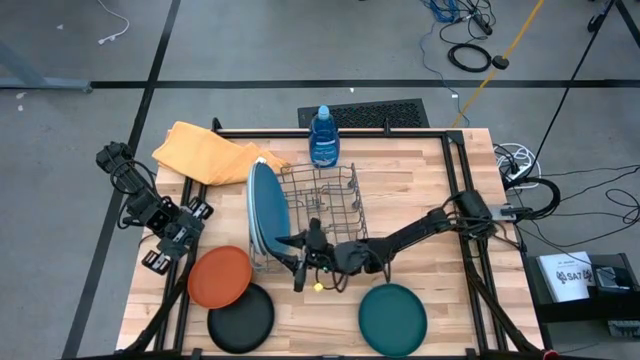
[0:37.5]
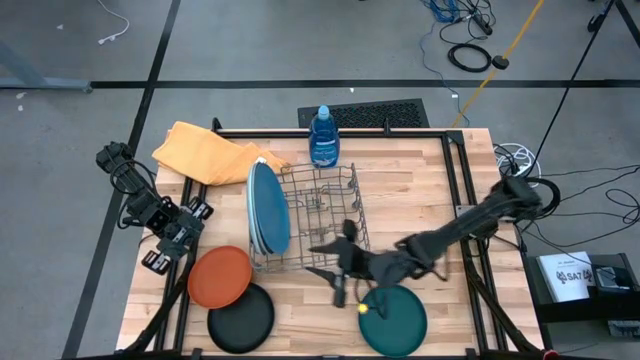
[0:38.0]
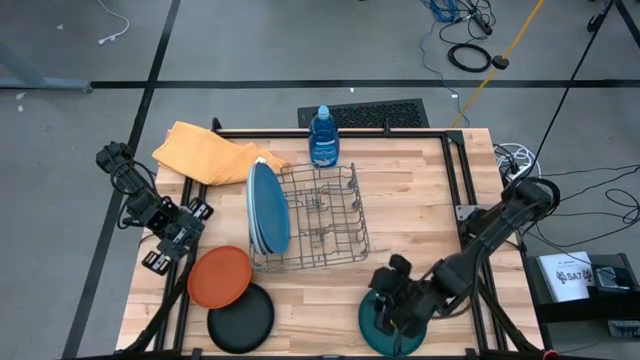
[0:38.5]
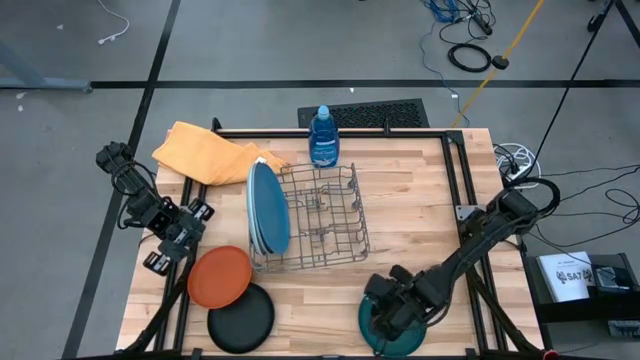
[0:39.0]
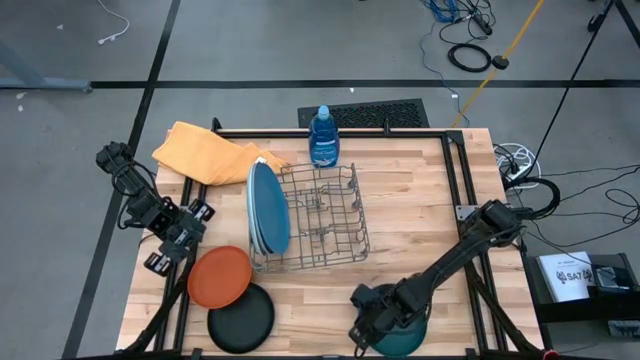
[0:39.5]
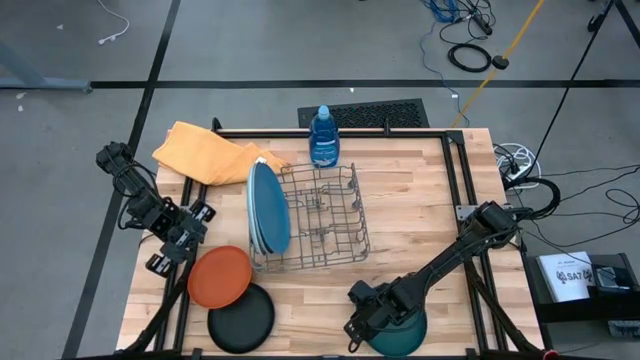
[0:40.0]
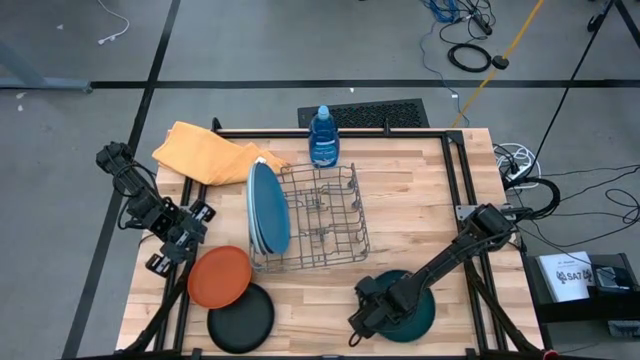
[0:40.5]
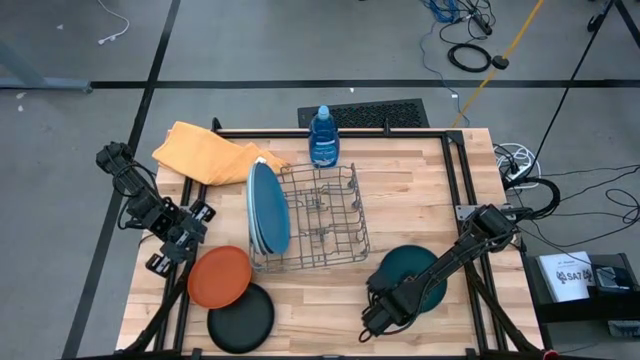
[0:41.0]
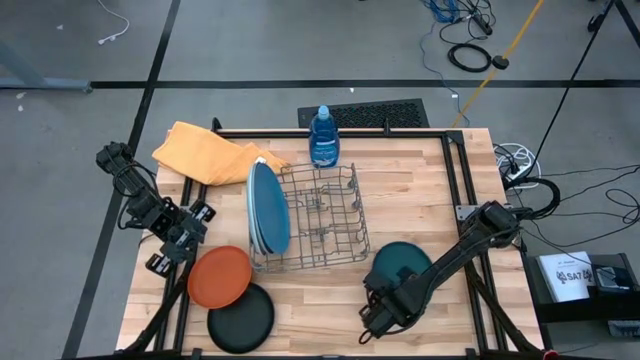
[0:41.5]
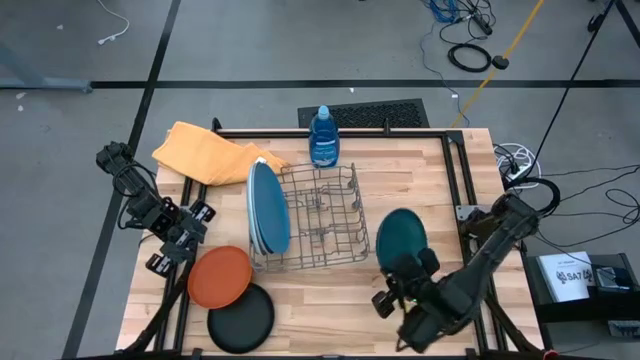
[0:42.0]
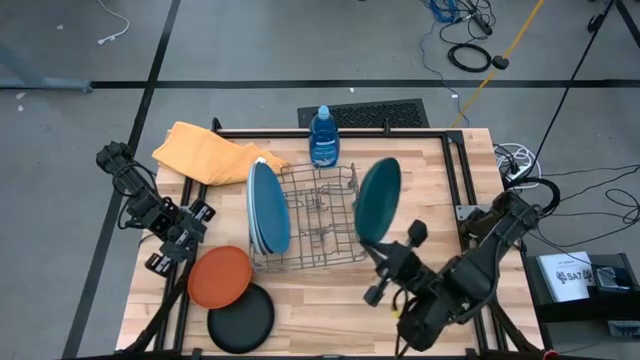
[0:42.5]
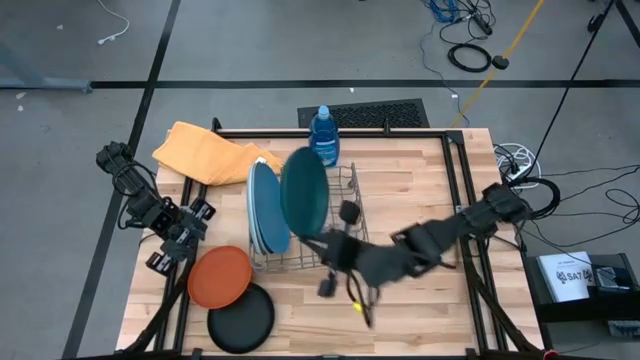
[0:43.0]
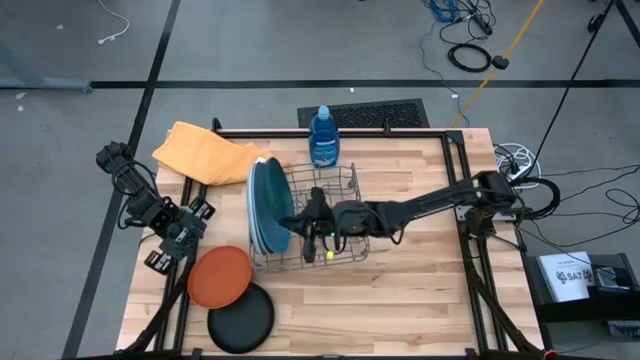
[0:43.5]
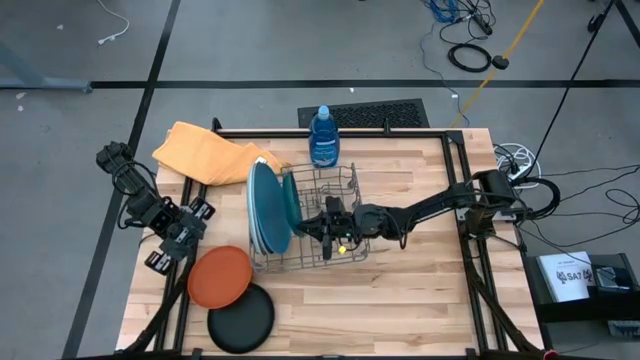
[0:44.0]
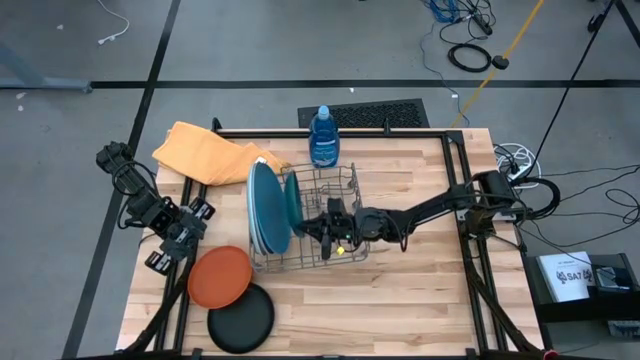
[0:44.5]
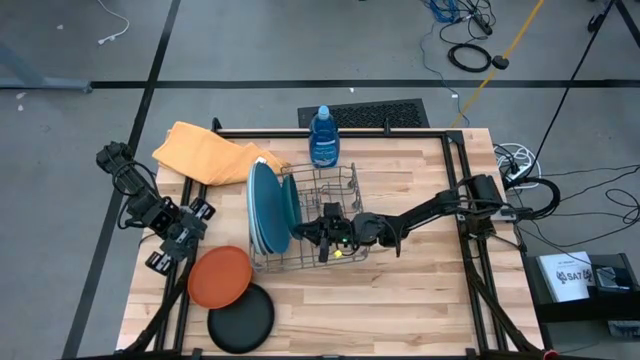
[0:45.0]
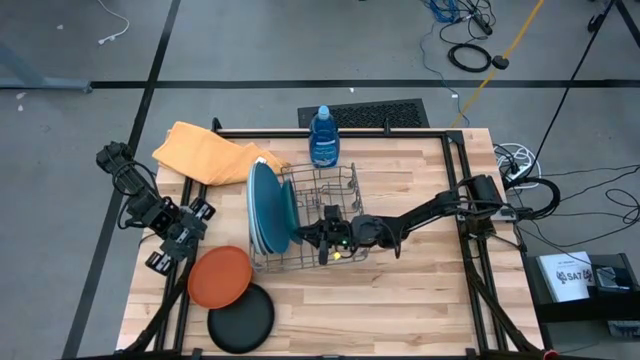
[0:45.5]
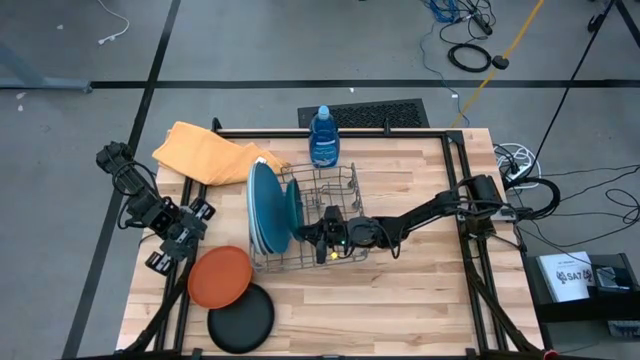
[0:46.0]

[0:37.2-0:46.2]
Task: Sort dishes
Put the dark green plate in the dish rack

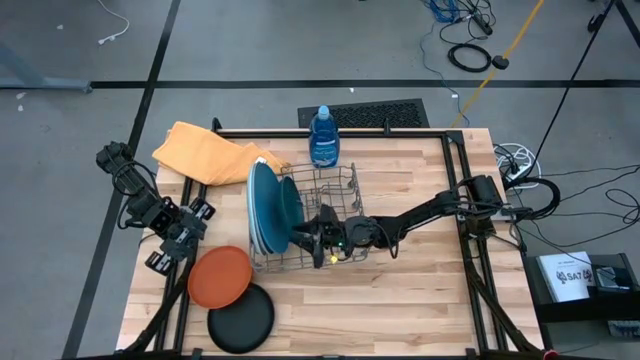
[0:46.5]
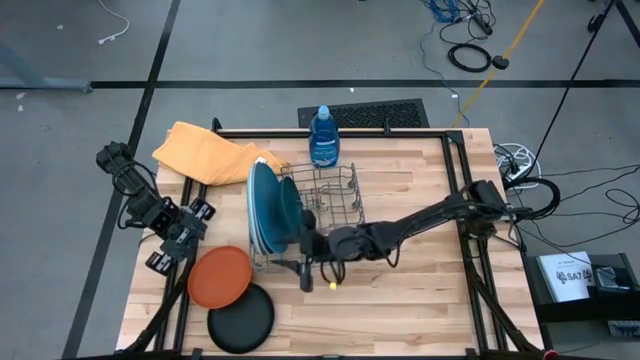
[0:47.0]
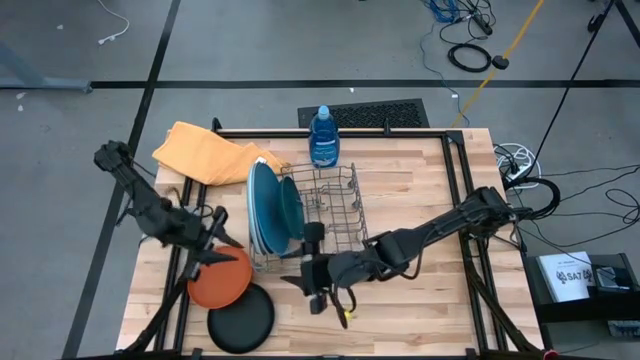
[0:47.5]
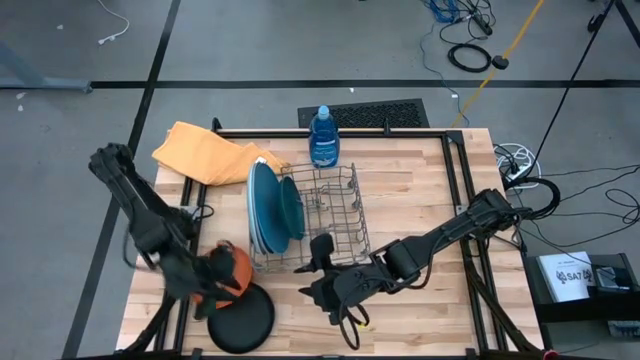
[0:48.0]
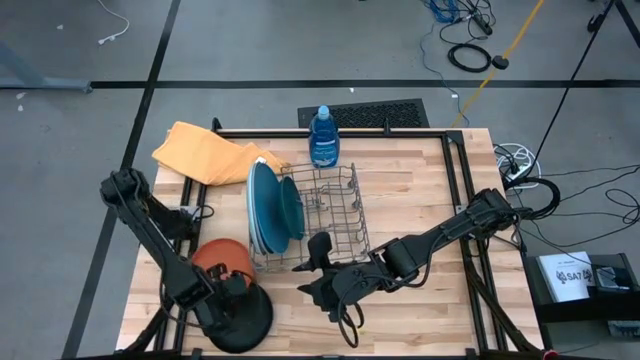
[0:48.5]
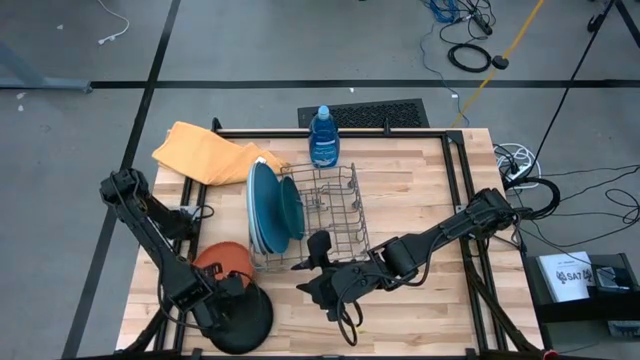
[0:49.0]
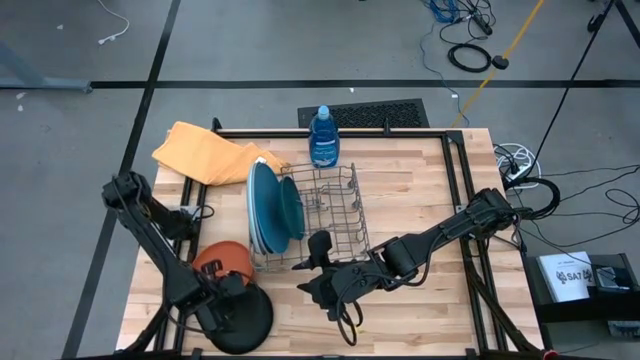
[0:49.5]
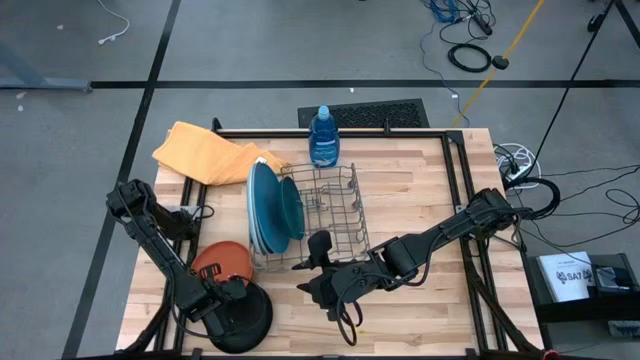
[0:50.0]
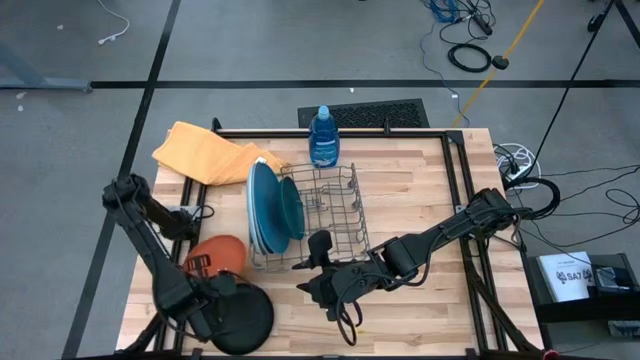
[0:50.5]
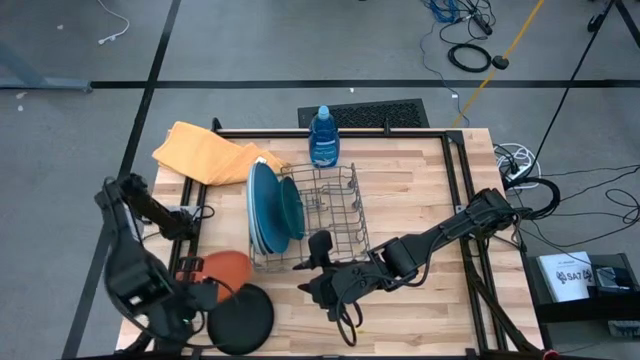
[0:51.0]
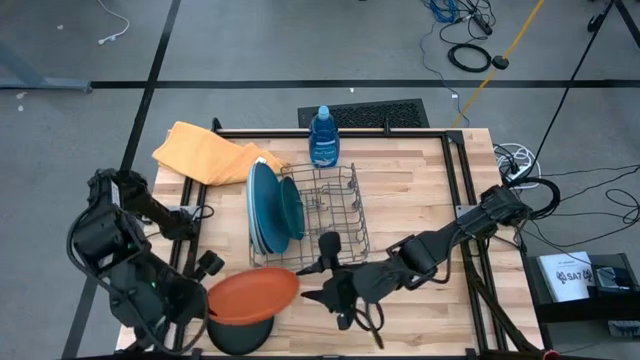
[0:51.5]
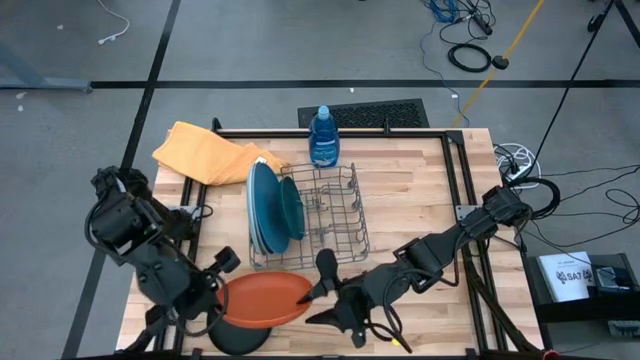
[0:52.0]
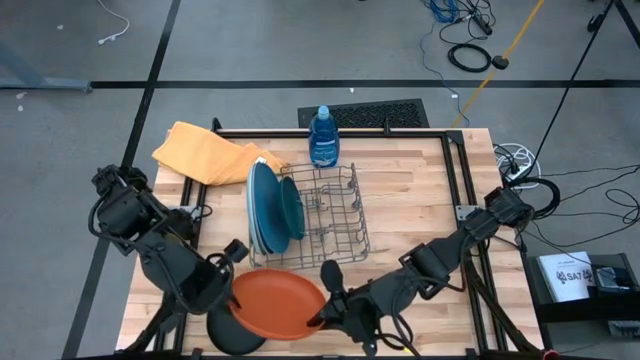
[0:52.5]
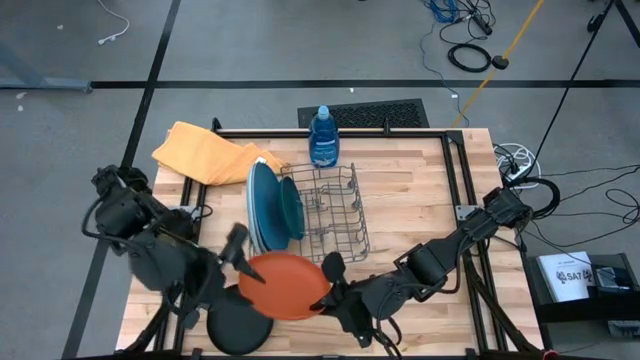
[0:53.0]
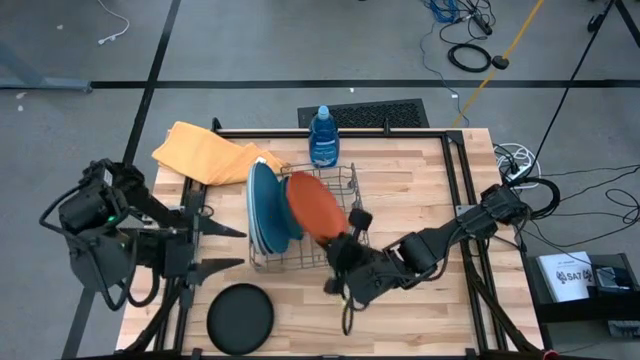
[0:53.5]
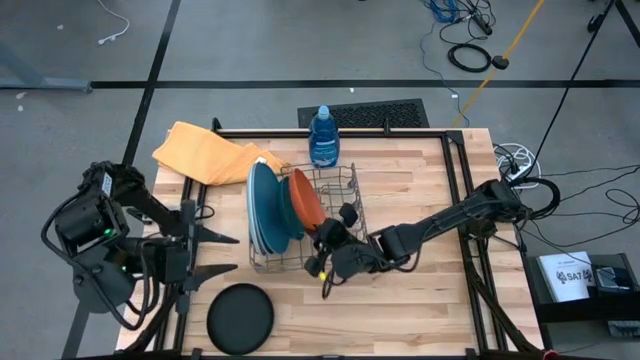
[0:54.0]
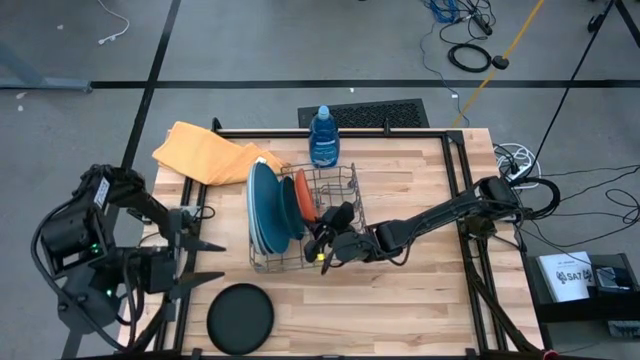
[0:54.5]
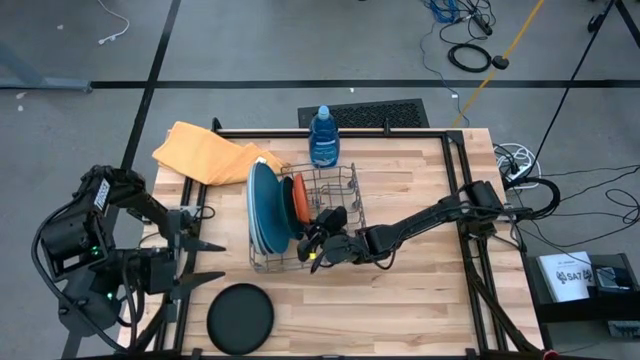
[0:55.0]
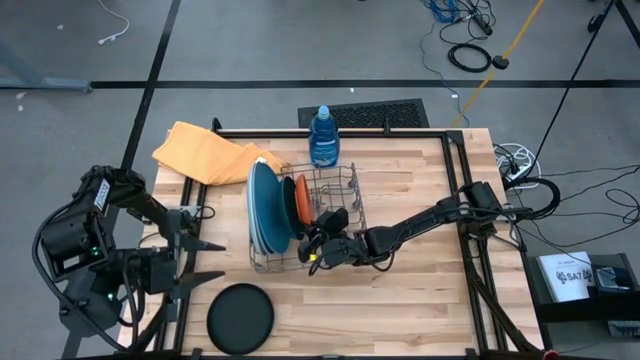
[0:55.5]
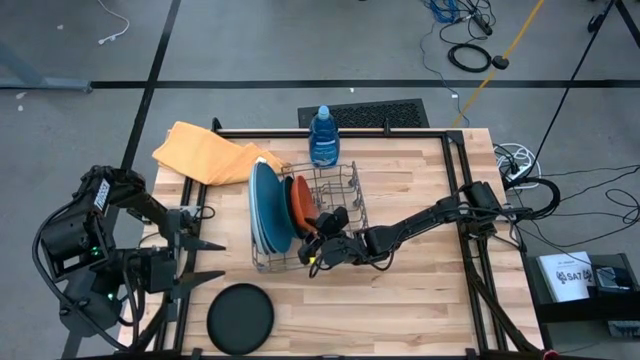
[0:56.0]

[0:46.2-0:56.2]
Put the orange plate in the dish rack

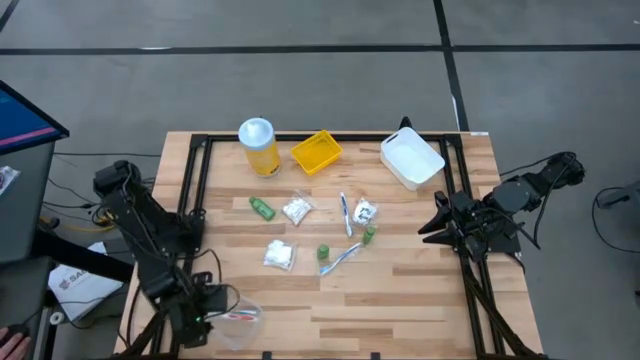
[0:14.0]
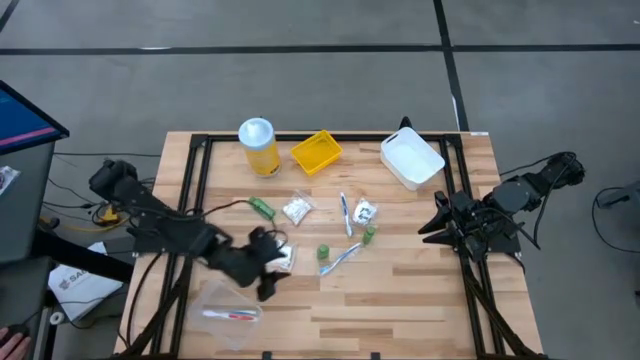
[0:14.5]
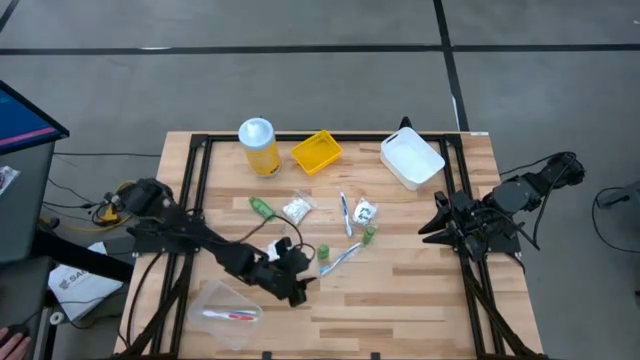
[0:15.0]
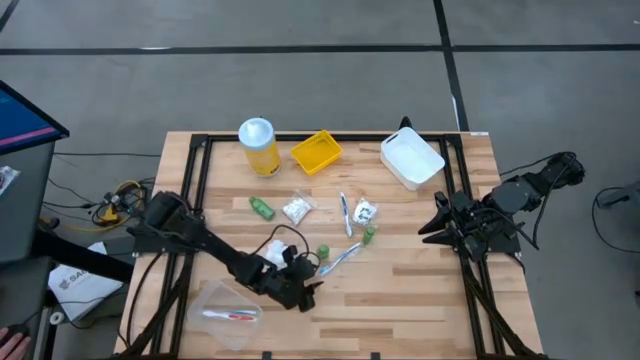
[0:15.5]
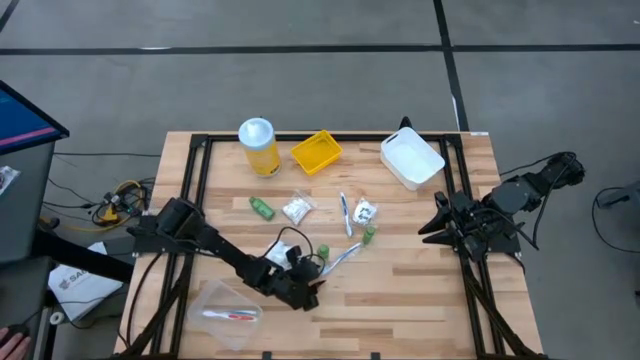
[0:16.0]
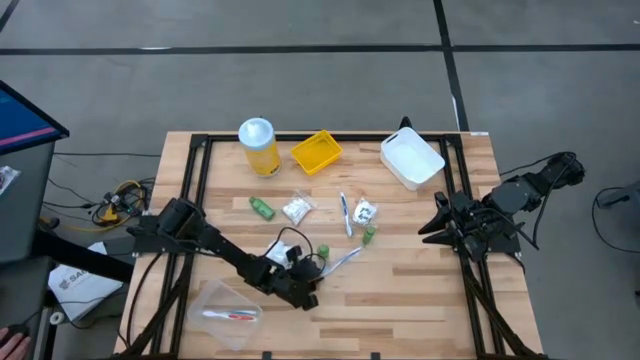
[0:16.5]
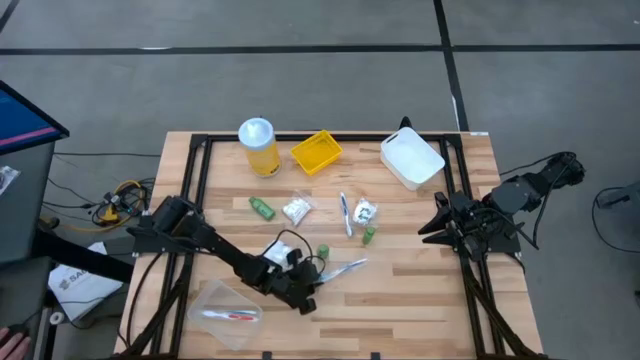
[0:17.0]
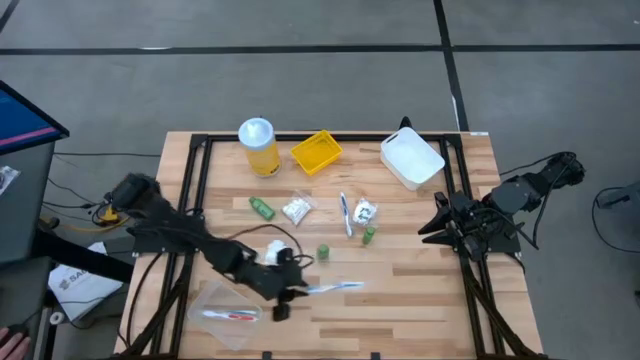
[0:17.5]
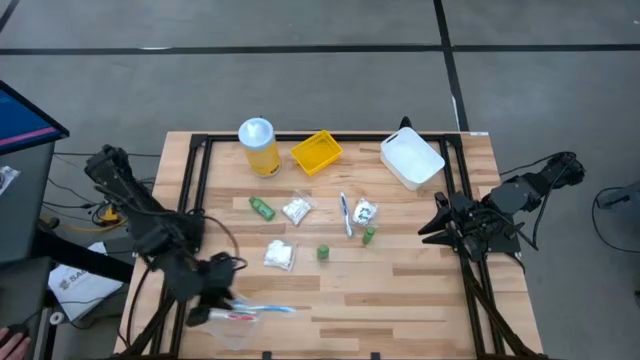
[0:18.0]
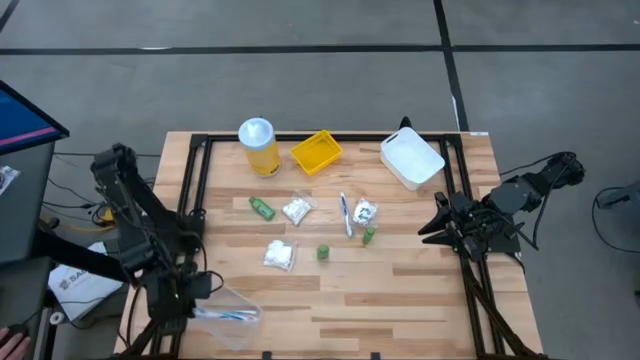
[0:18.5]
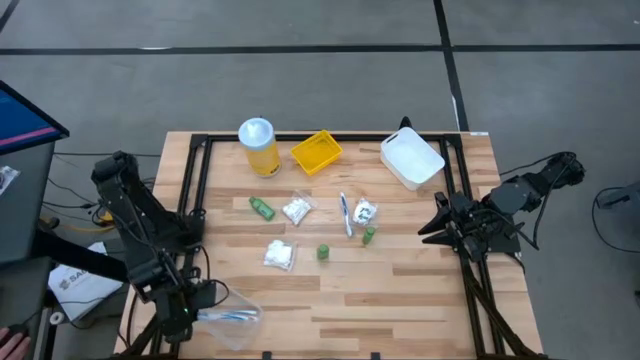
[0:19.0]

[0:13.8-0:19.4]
Task: Pick & Place Travel size toiletries
Put the light blue toothbrush into the transparent bin
